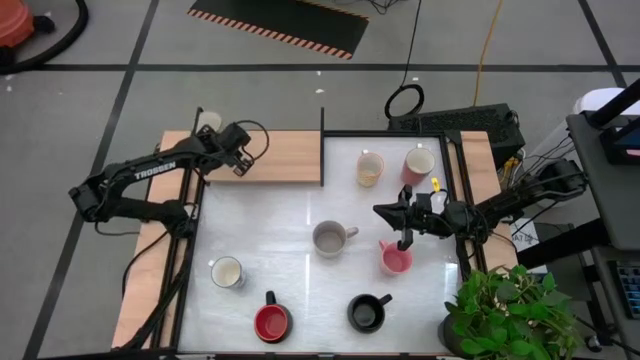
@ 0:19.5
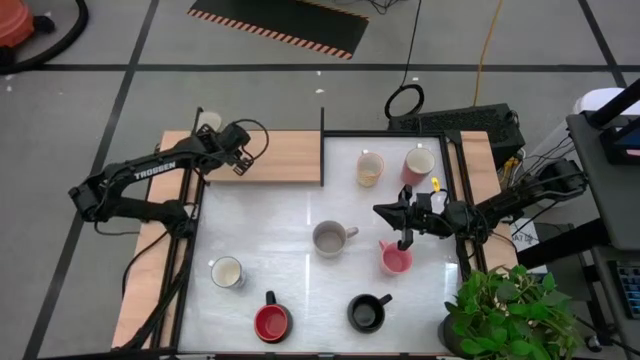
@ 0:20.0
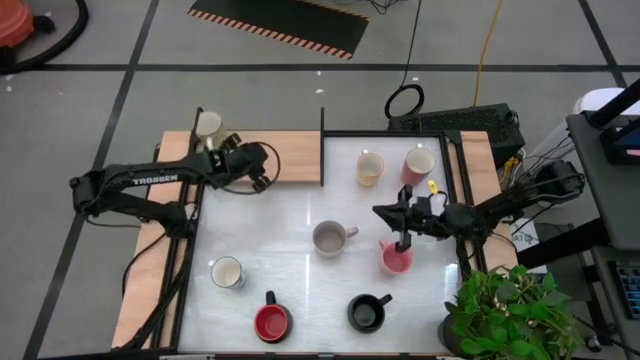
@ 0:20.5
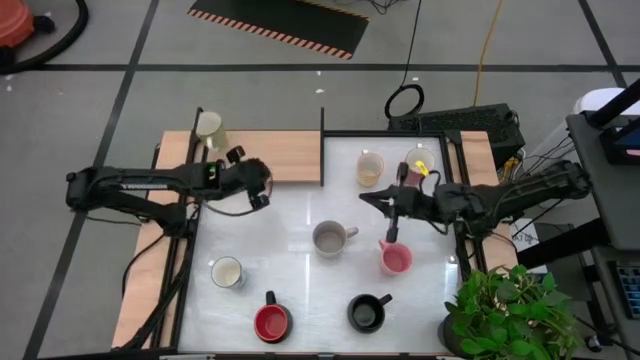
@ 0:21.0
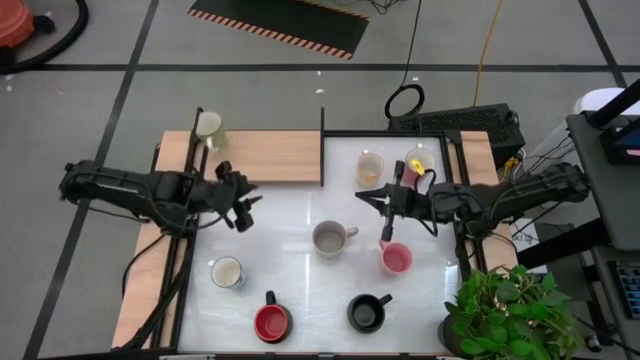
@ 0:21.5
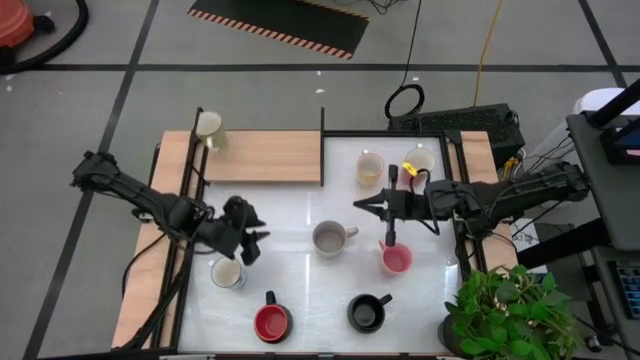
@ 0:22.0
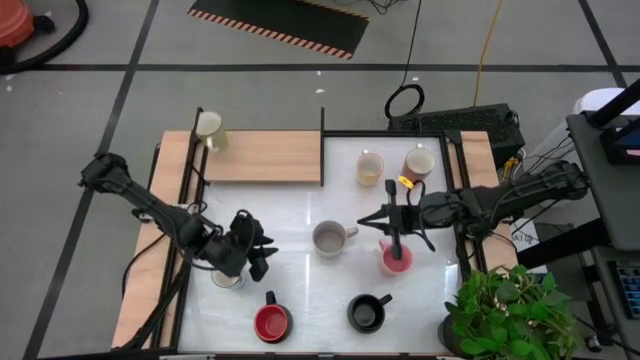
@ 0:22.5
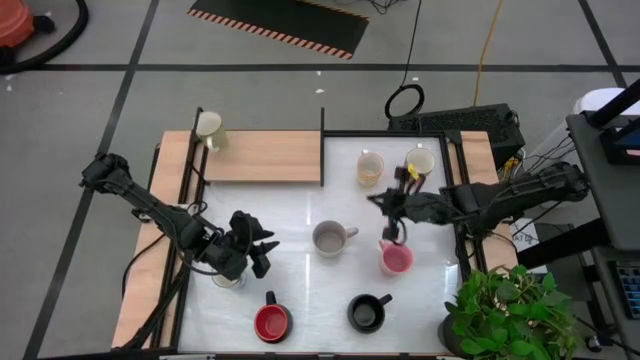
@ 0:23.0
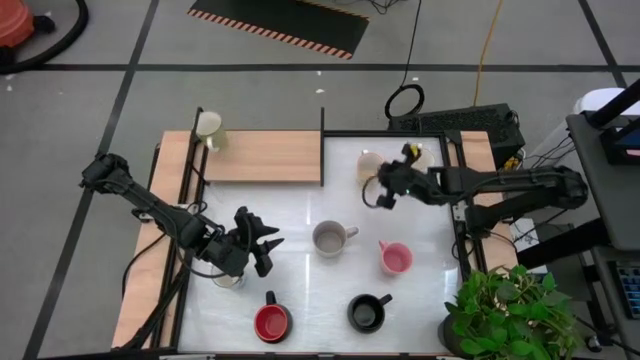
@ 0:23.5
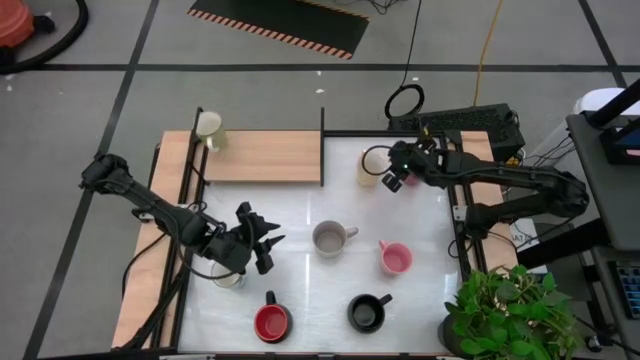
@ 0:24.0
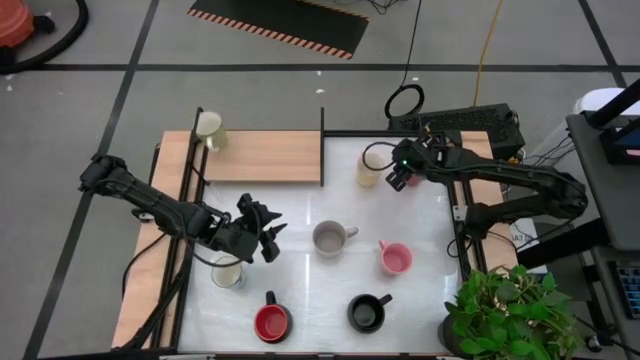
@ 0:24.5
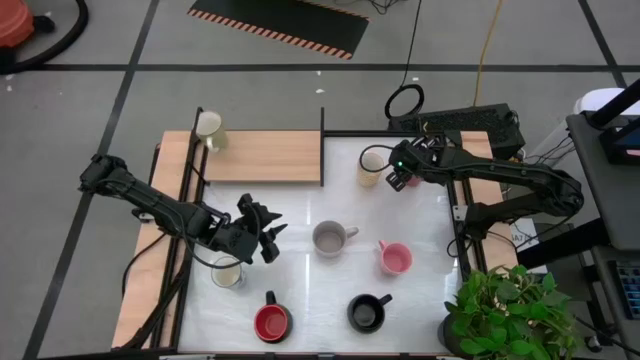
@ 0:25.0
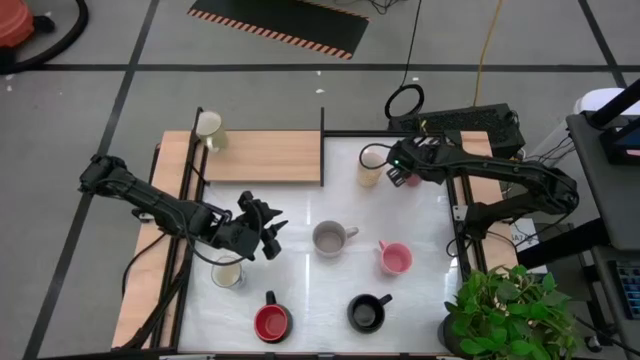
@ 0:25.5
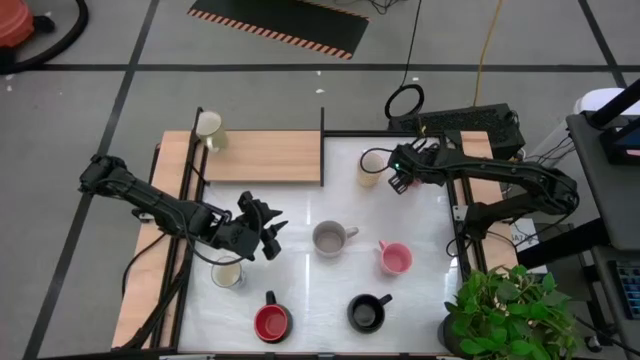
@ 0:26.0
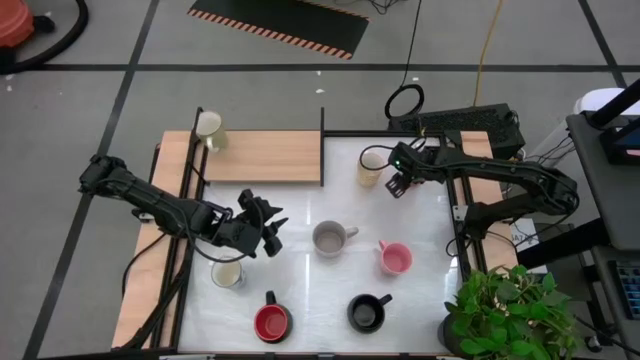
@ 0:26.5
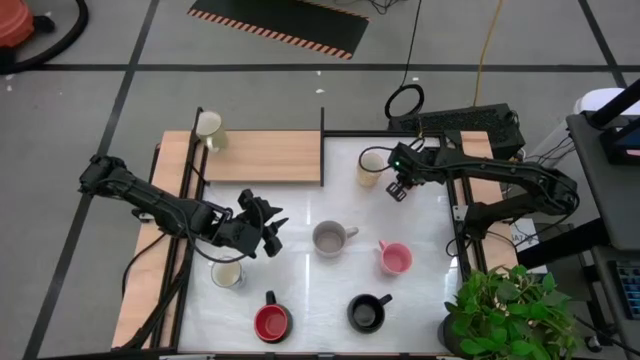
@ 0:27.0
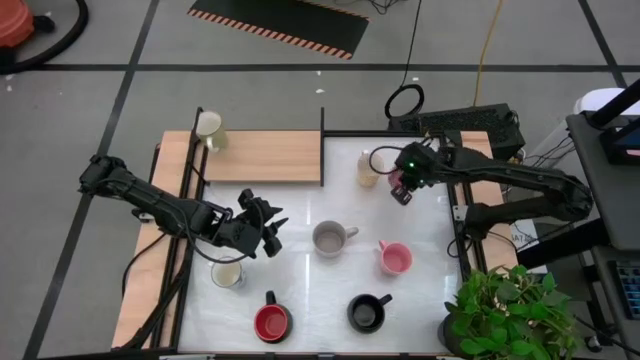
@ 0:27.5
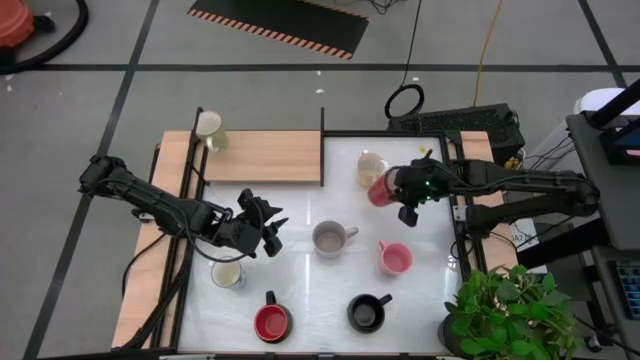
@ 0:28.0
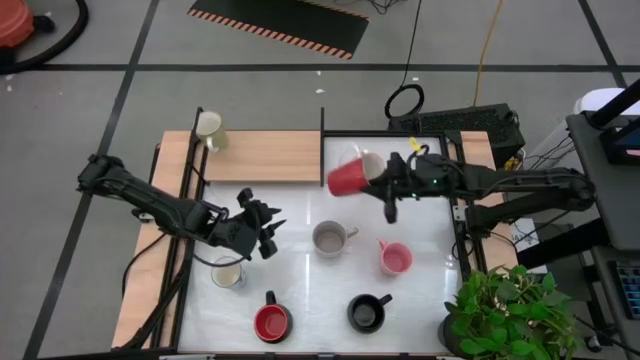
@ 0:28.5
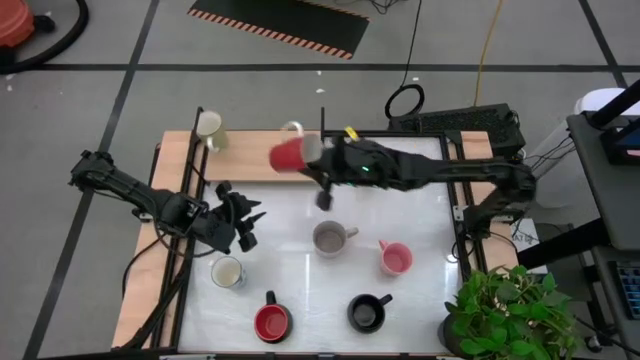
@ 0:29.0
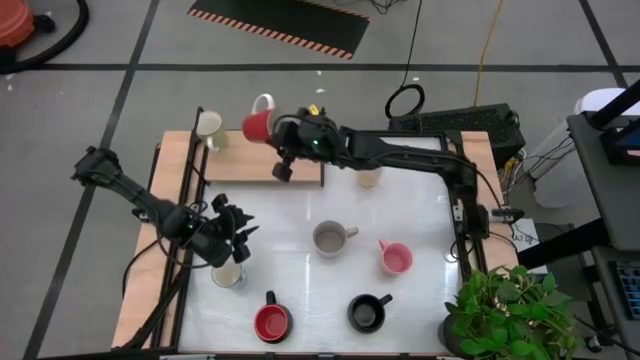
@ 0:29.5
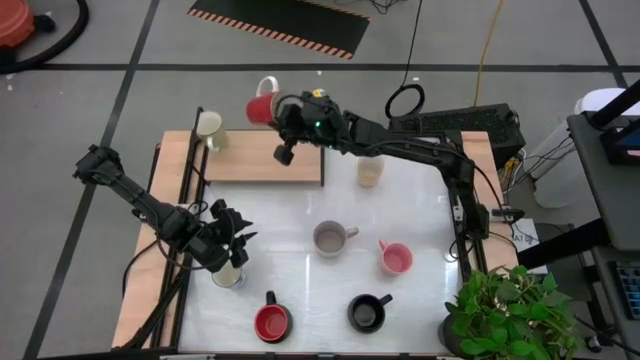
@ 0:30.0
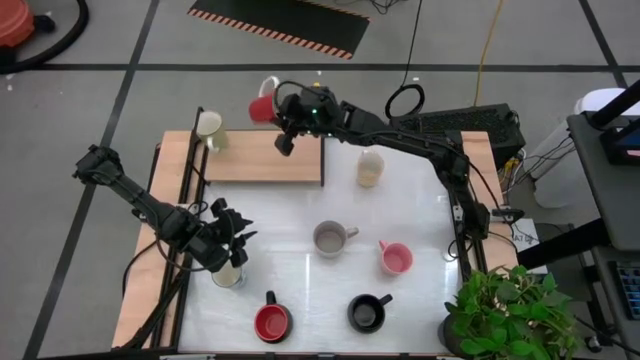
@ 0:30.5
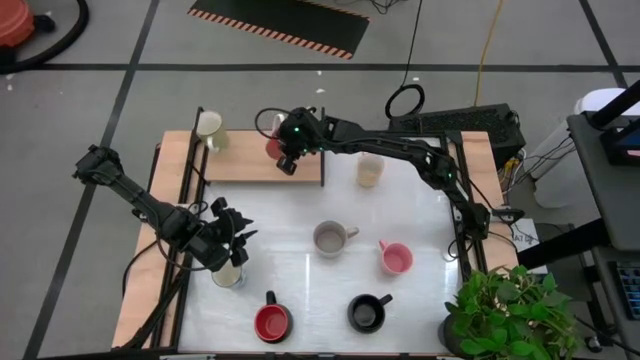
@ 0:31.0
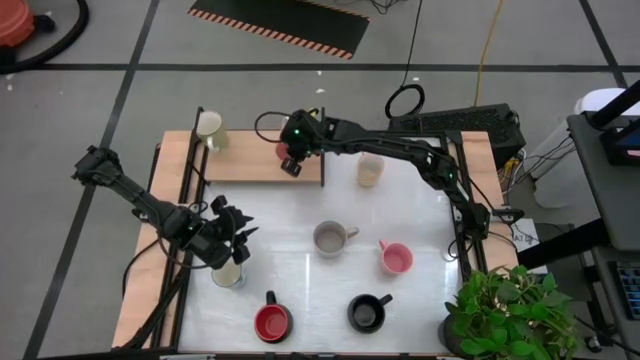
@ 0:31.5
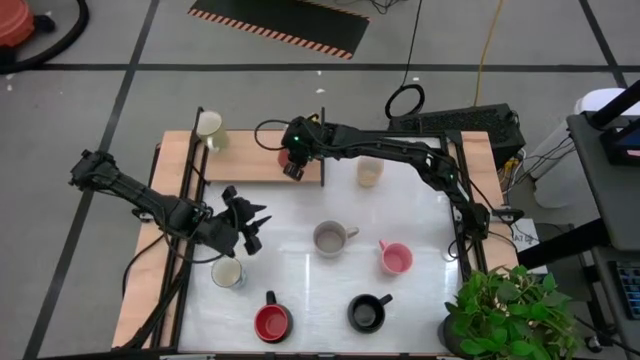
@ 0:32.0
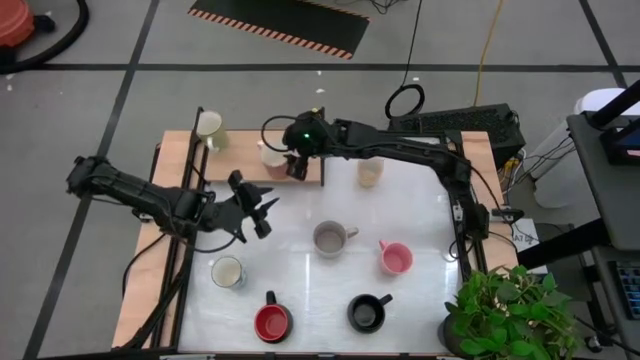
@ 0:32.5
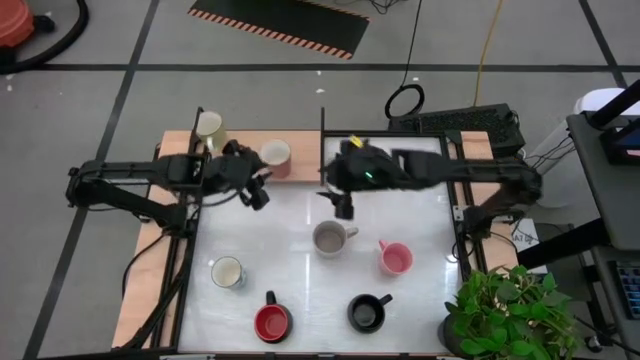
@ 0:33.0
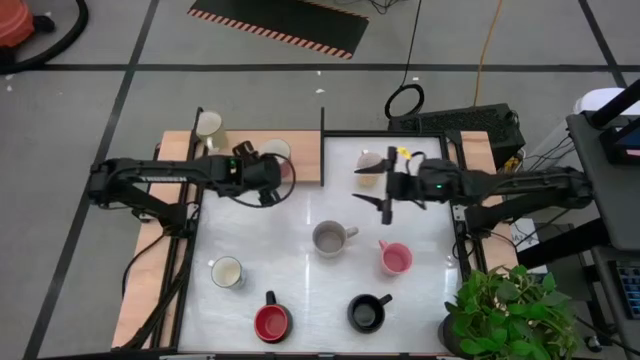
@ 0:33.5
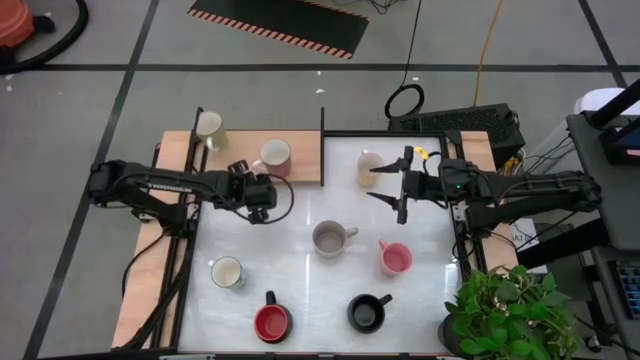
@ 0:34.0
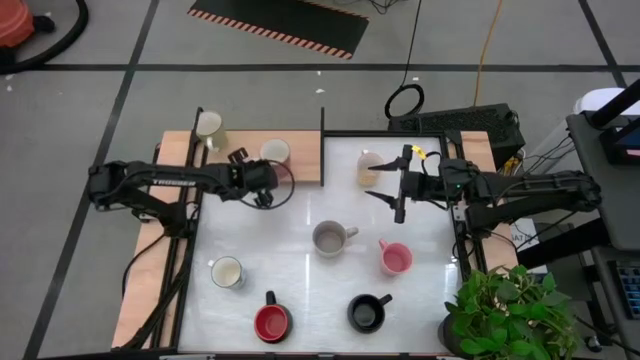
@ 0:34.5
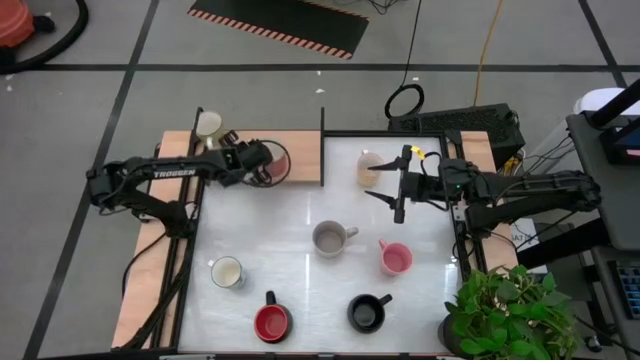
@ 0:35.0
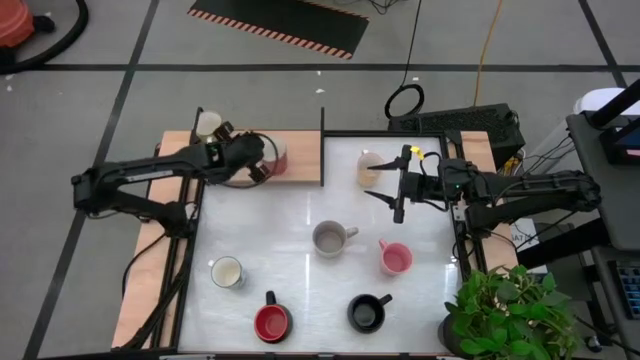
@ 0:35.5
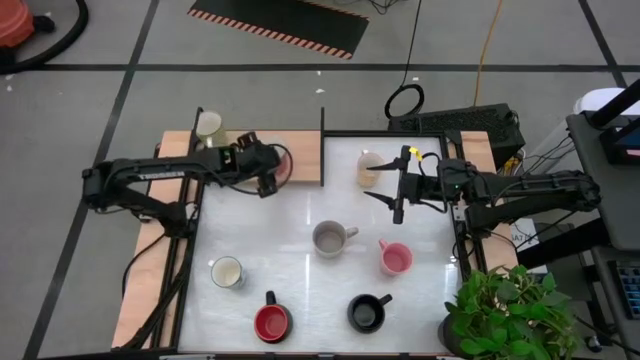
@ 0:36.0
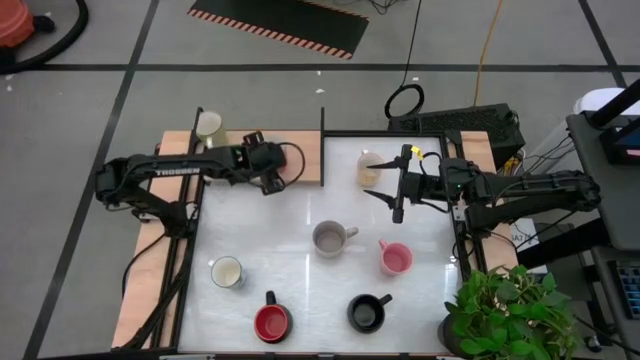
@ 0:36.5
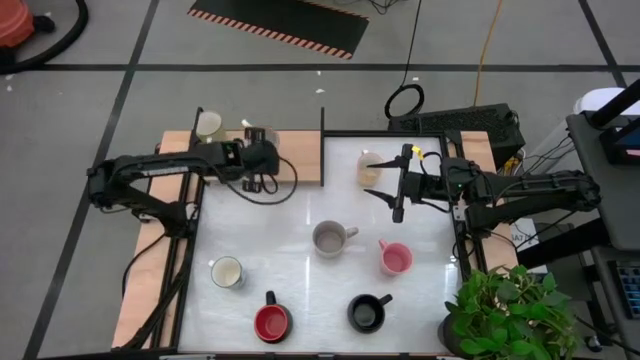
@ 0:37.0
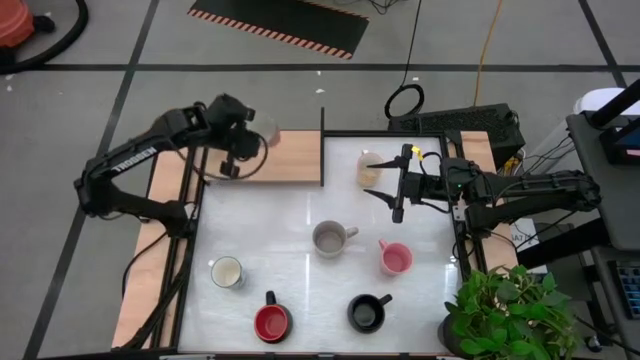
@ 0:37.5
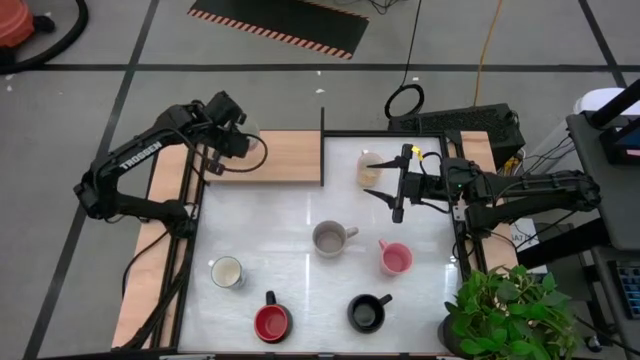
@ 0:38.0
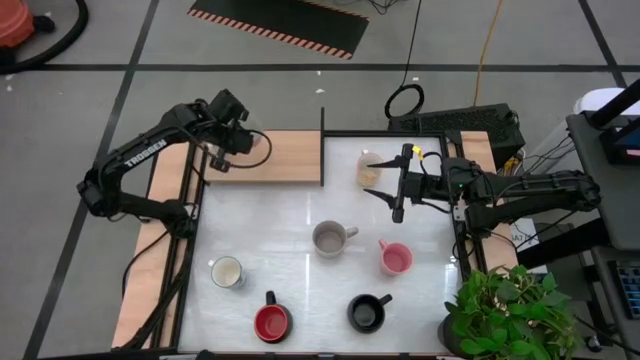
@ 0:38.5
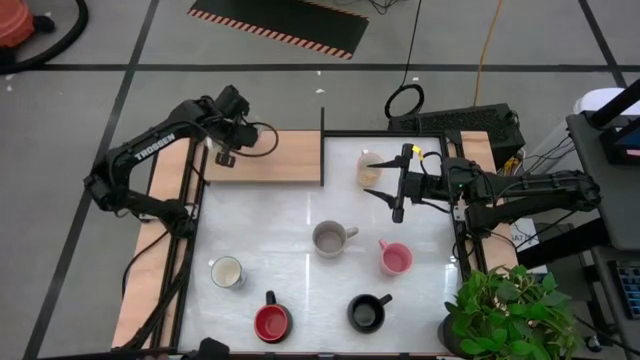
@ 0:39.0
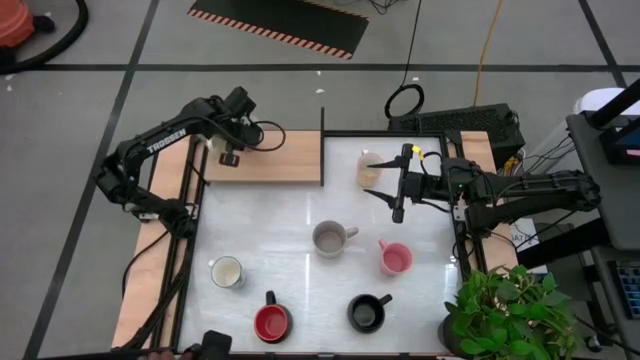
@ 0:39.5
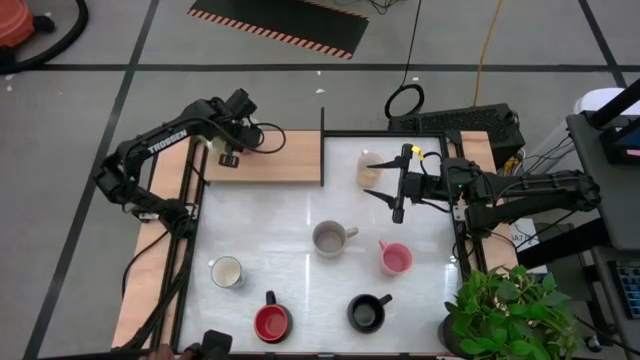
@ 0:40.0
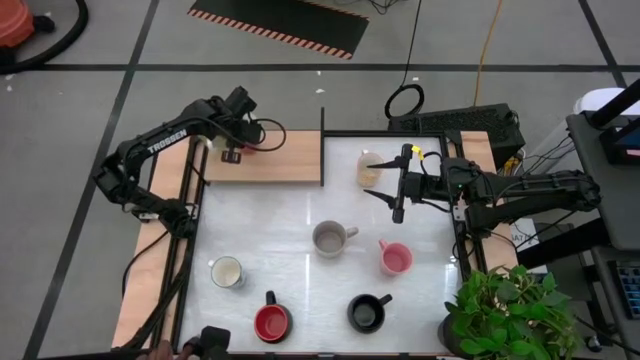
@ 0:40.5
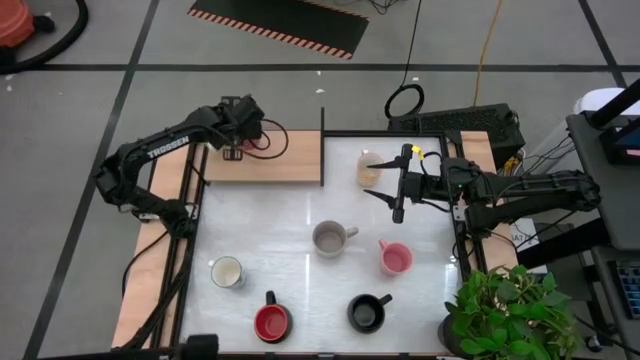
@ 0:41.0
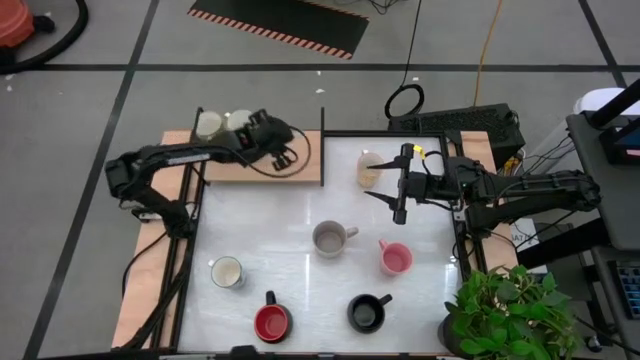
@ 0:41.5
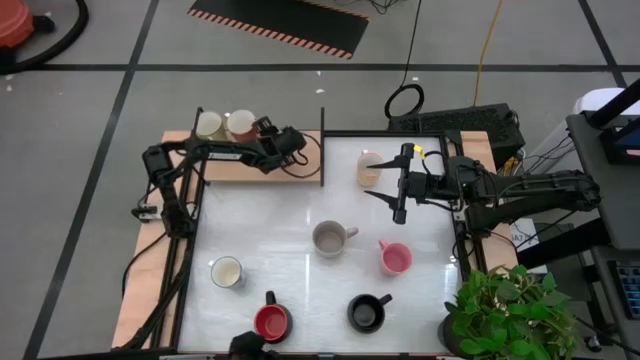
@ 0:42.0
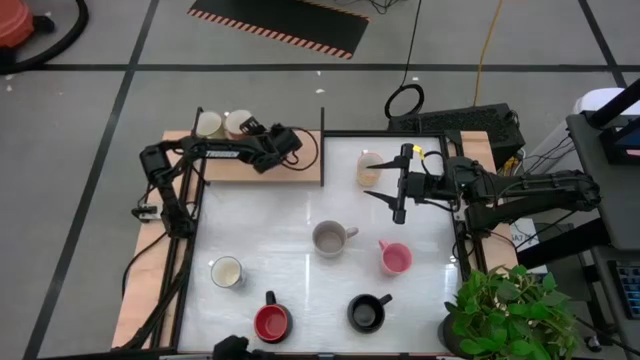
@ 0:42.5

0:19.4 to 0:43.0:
Task: Place coffee mugs
Put the red mug on the shelf
